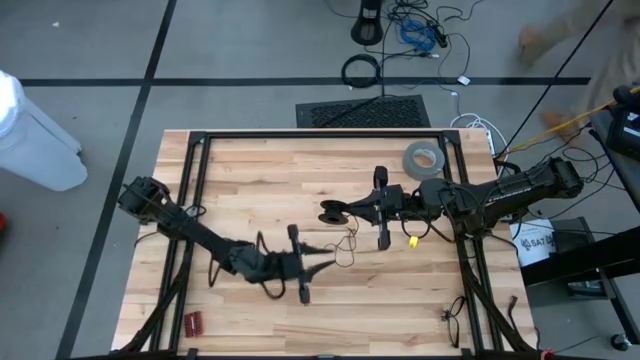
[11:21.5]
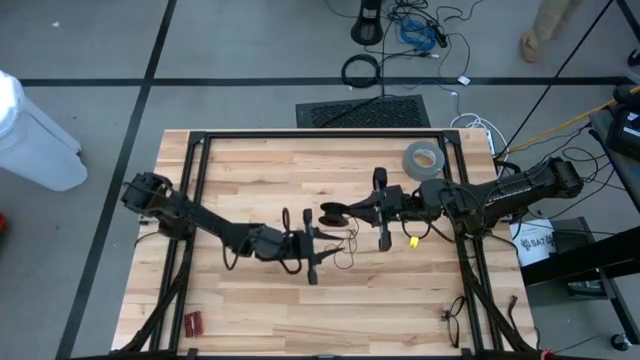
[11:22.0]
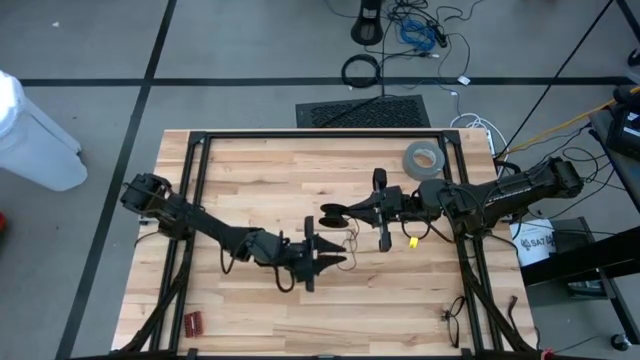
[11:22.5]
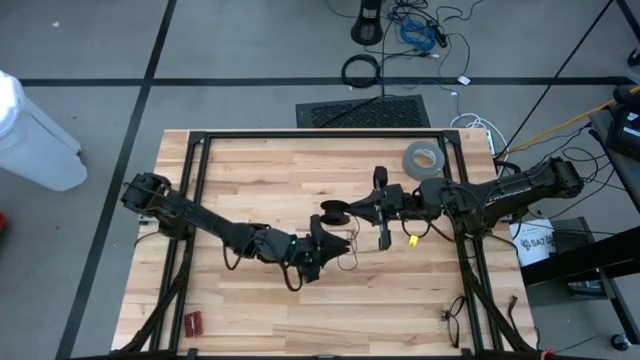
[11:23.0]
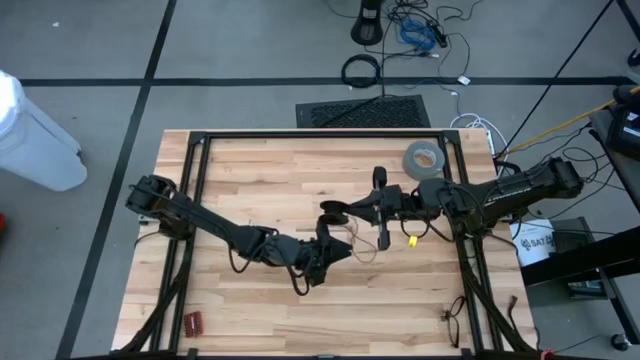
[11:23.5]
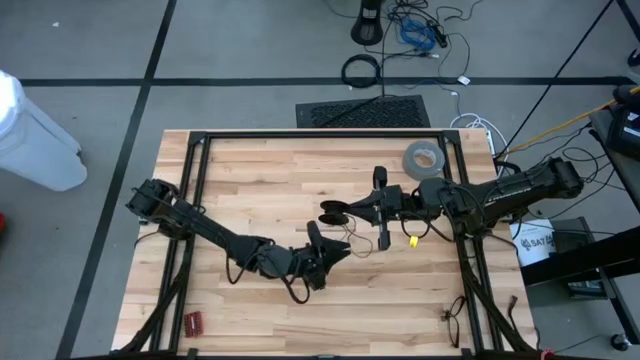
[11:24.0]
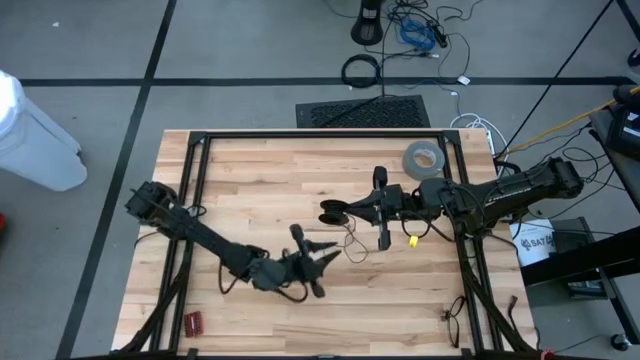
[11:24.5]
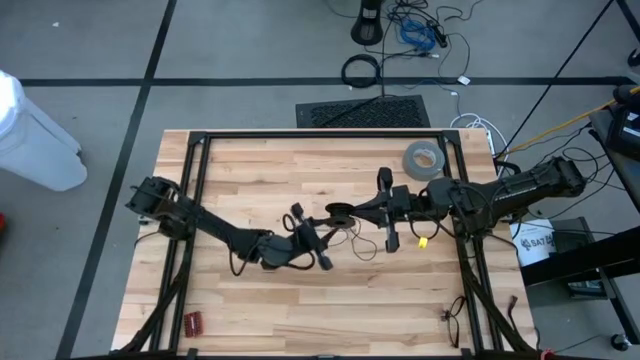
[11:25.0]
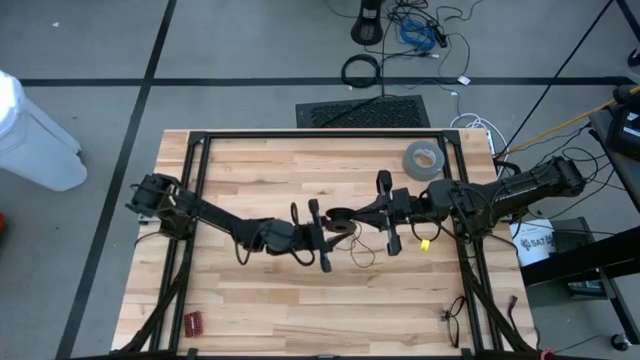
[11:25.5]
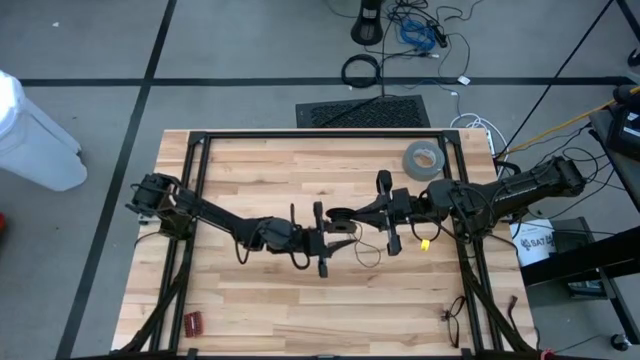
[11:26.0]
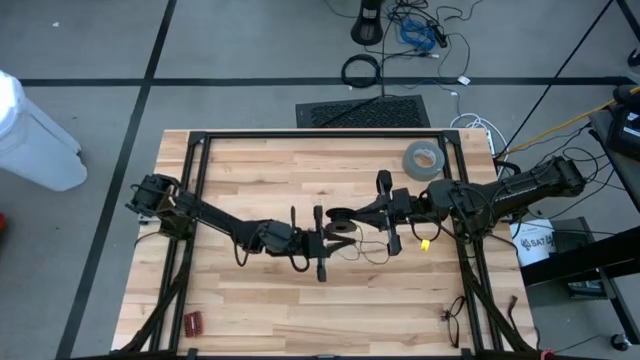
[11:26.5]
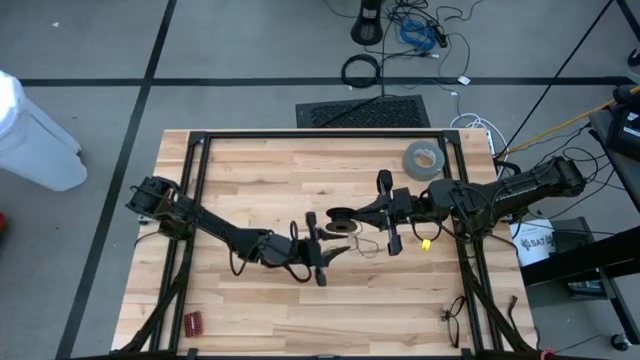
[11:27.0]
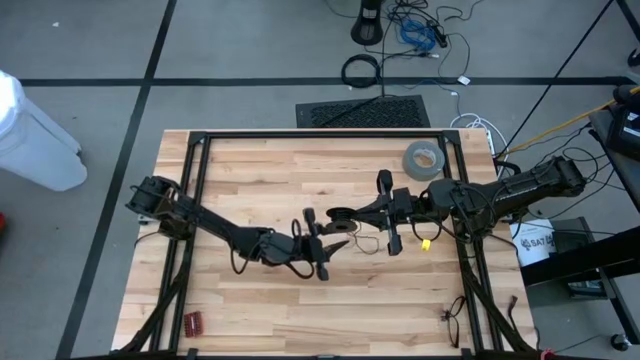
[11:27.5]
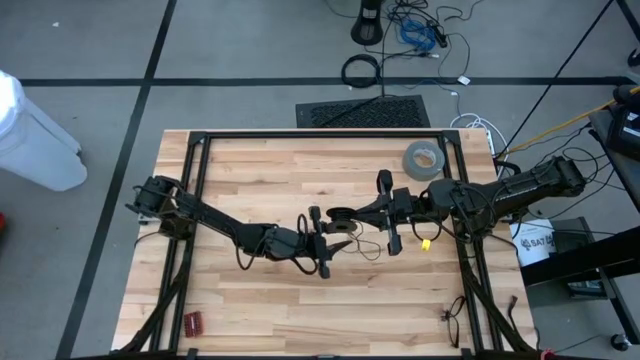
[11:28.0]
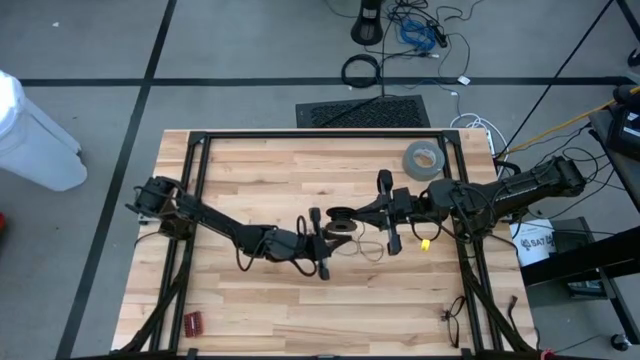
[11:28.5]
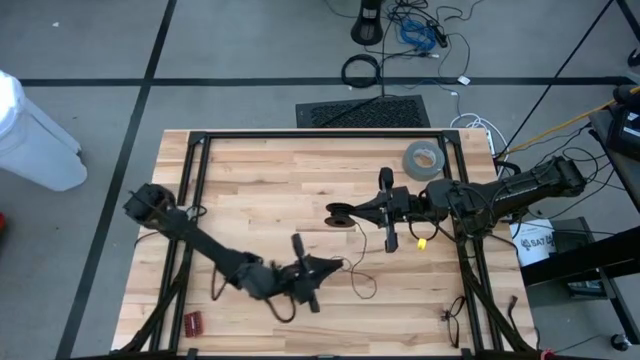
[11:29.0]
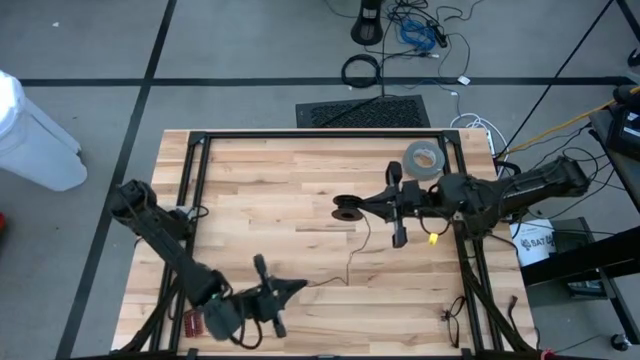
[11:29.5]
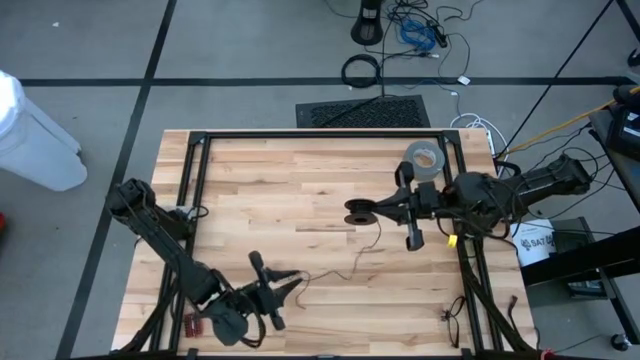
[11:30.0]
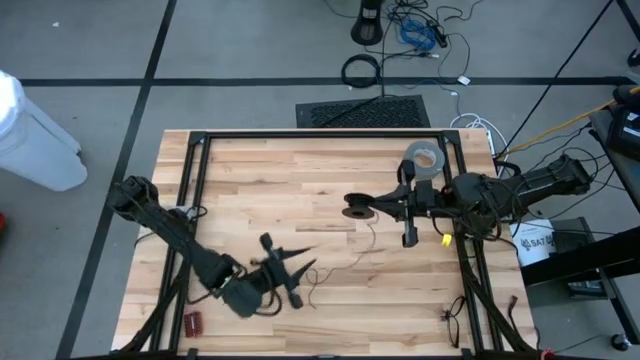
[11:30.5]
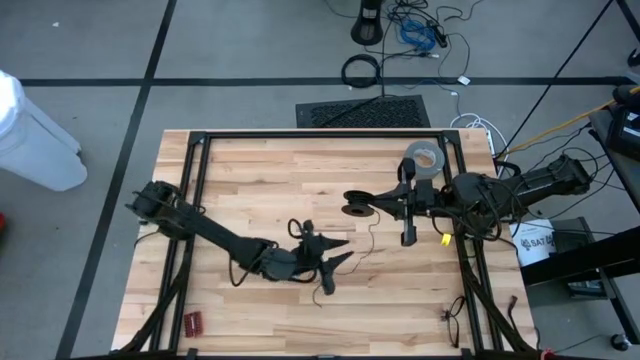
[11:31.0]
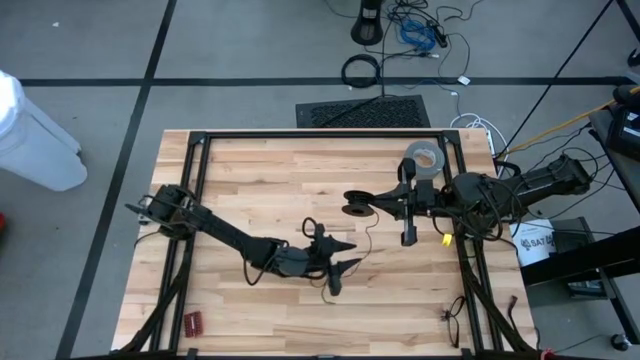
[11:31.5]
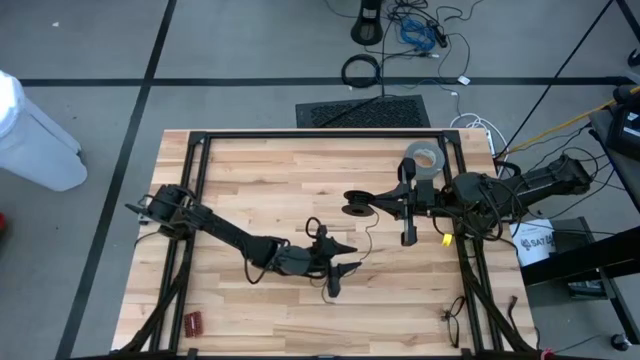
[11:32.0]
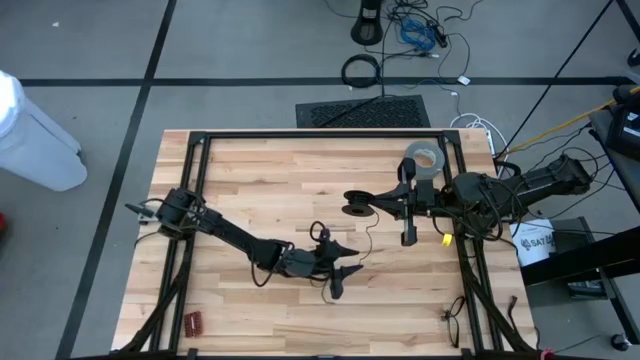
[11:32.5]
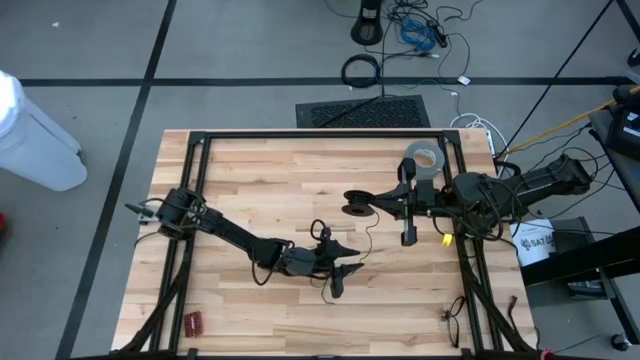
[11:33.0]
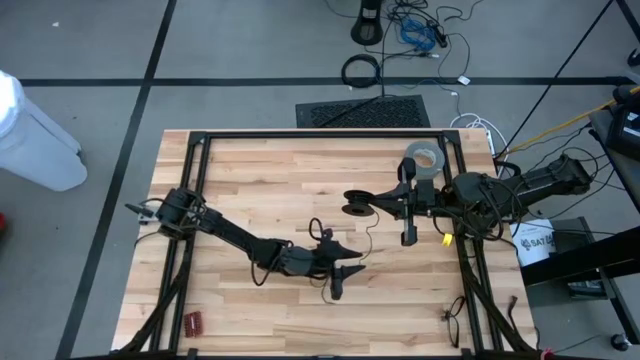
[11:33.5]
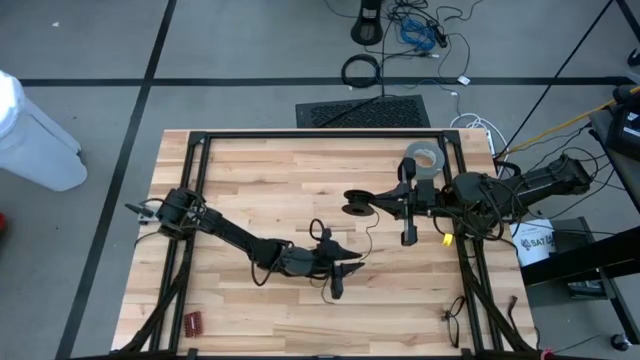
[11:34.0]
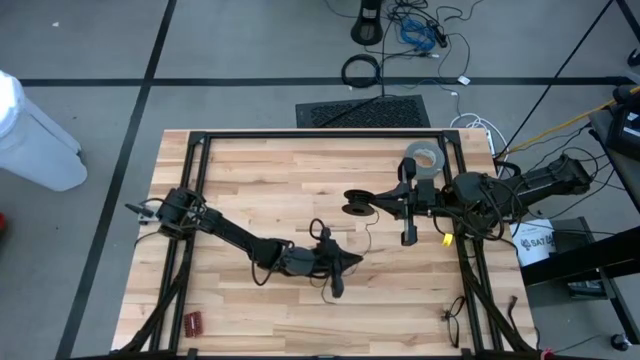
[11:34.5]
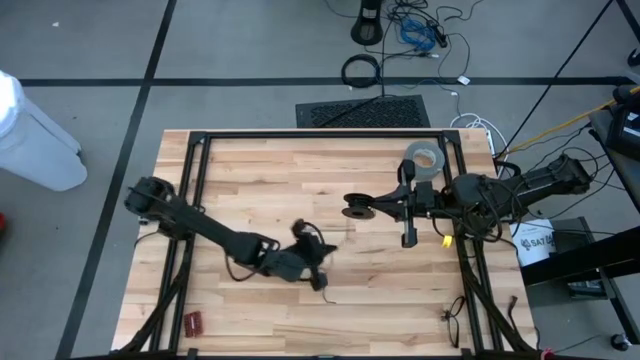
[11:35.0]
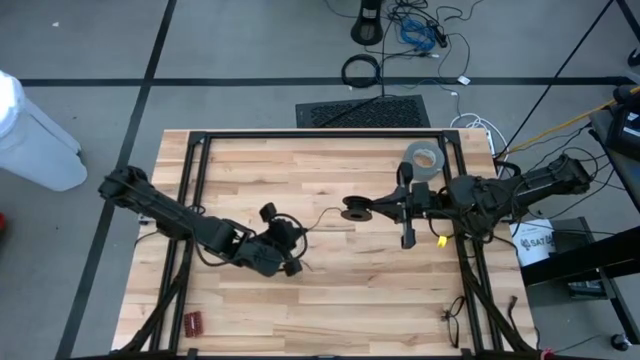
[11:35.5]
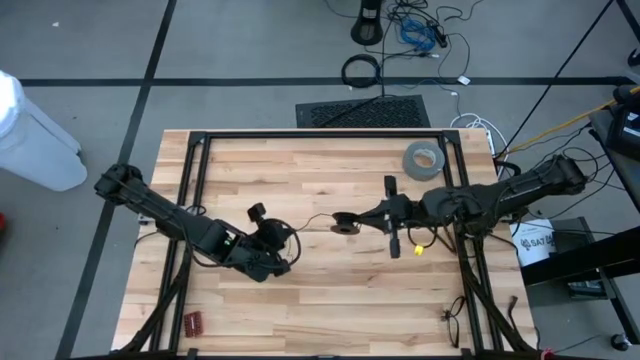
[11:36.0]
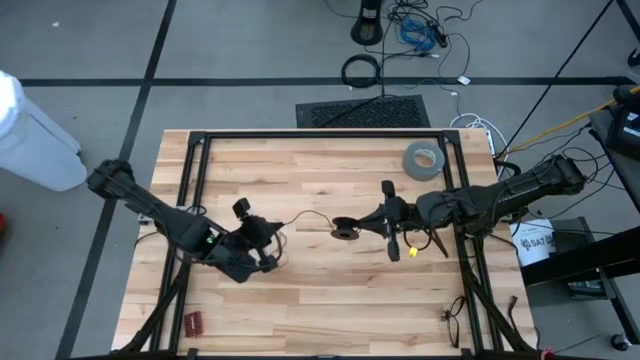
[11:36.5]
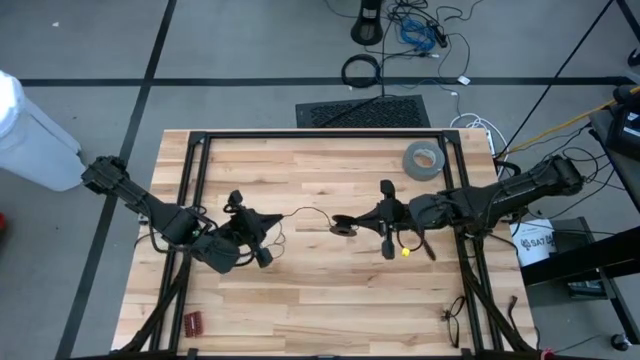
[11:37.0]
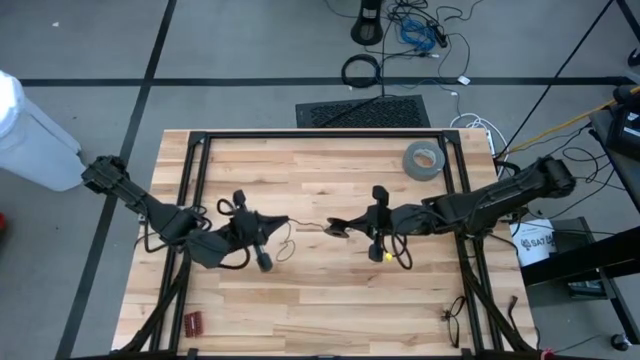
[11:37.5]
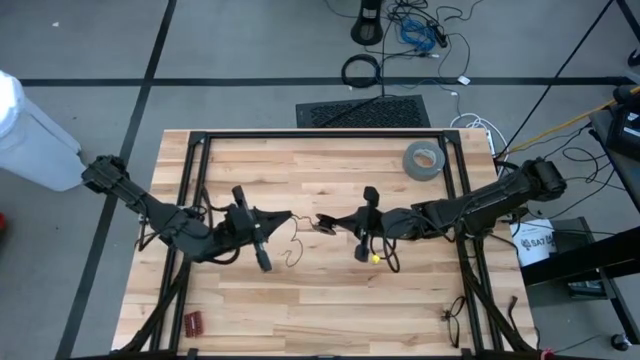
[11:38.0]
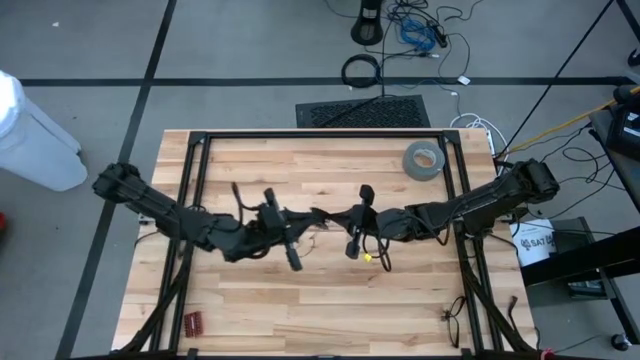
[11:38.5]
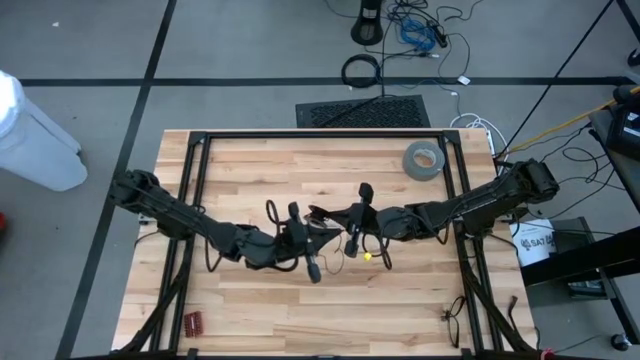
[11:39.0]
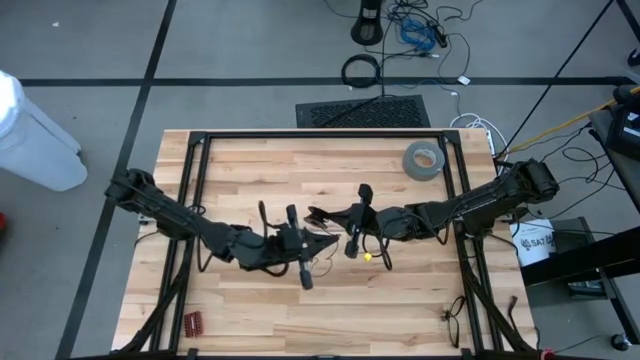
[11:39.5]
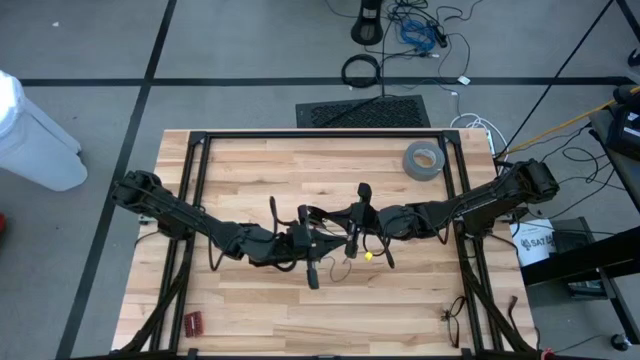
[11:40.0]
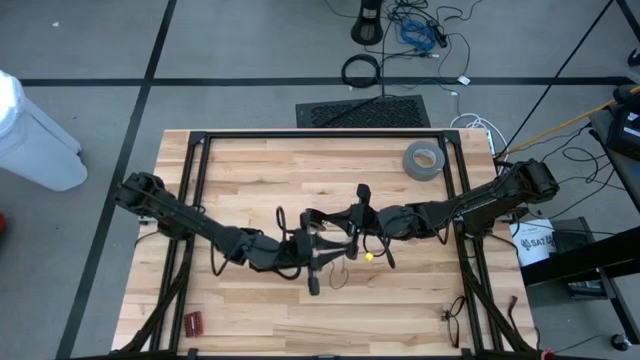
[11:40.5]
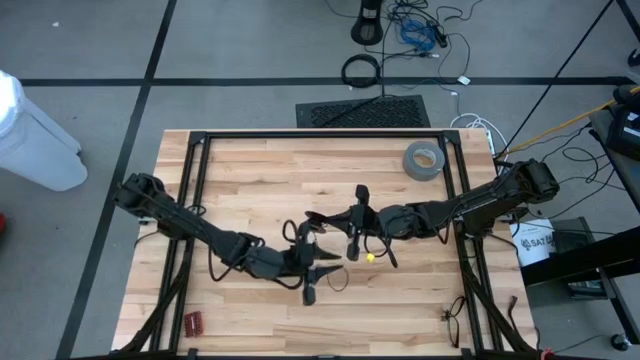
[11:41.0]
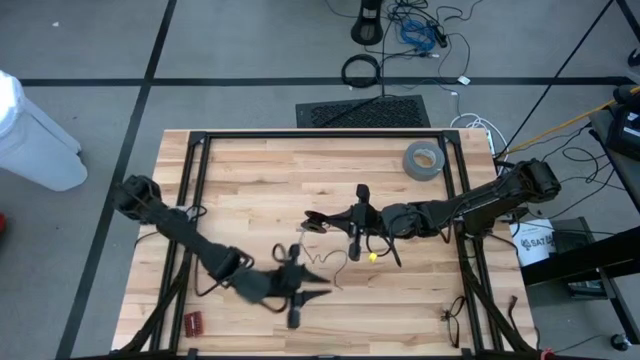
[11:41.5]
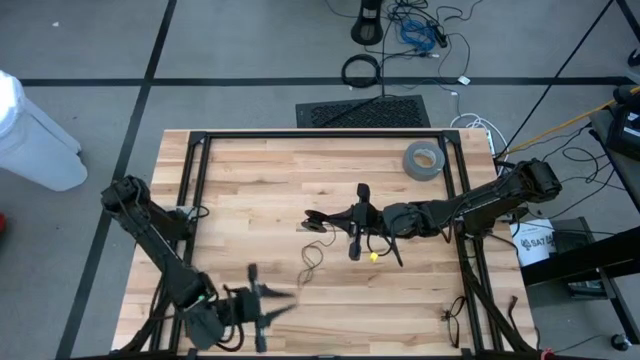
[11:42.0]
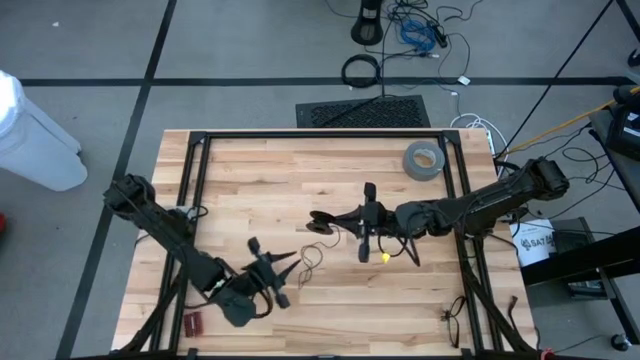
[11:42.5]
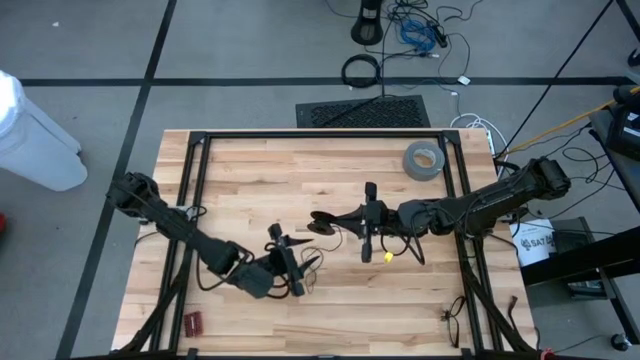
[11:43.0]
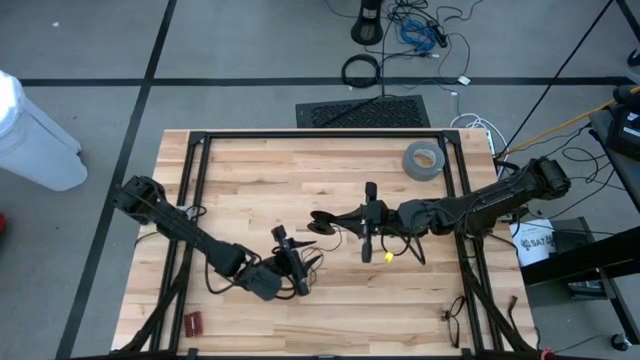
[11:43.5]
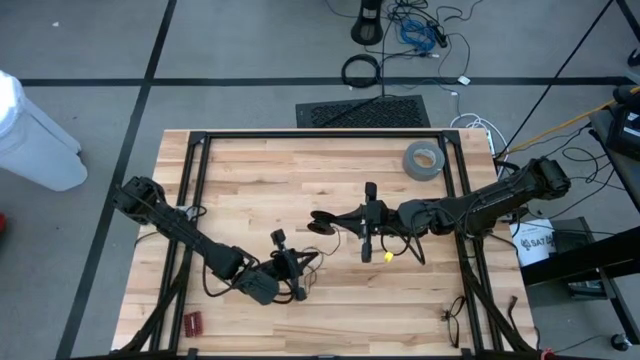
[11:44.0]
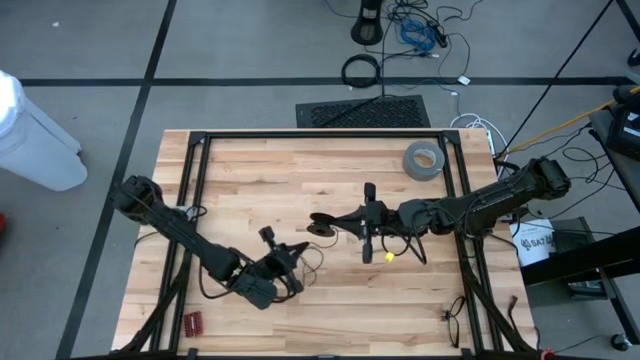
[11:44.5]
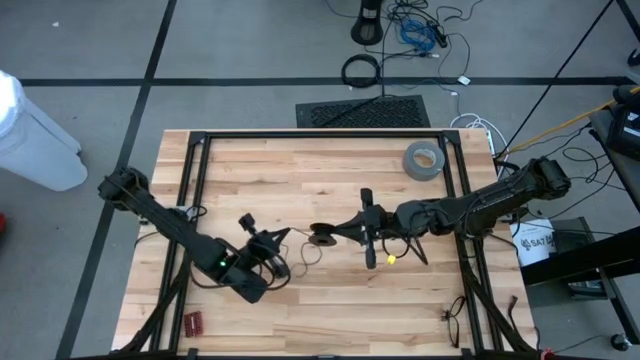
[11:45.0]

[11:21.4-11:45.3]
Task: Coil cords
Coil the black wire onto the spool
